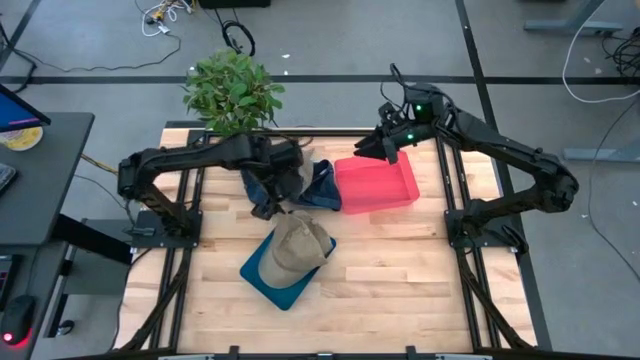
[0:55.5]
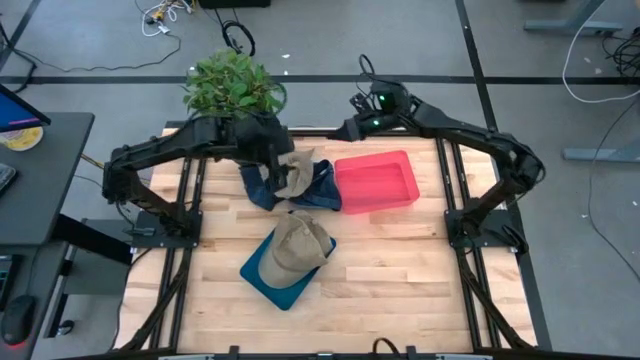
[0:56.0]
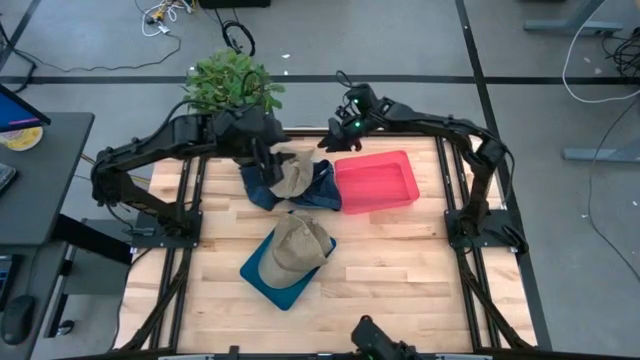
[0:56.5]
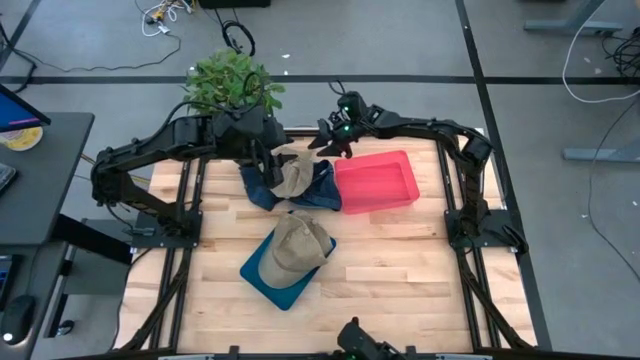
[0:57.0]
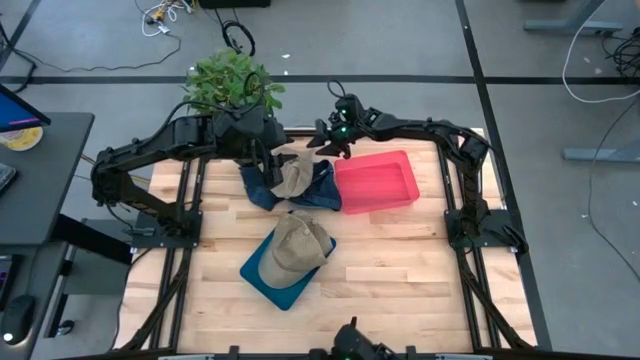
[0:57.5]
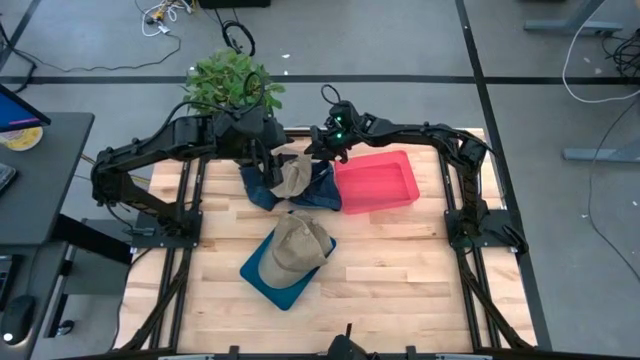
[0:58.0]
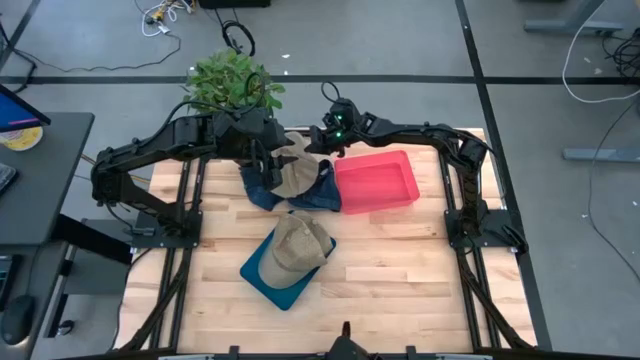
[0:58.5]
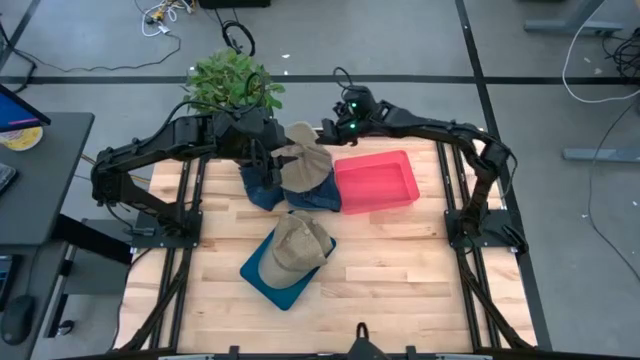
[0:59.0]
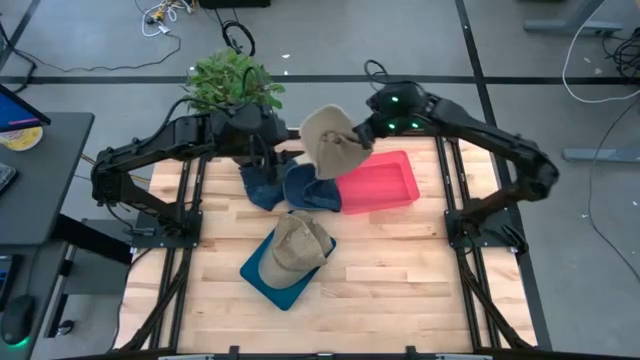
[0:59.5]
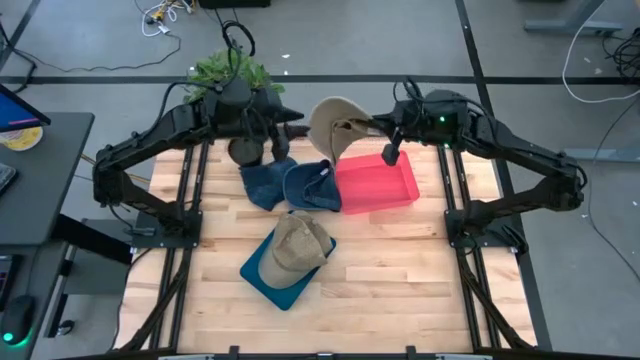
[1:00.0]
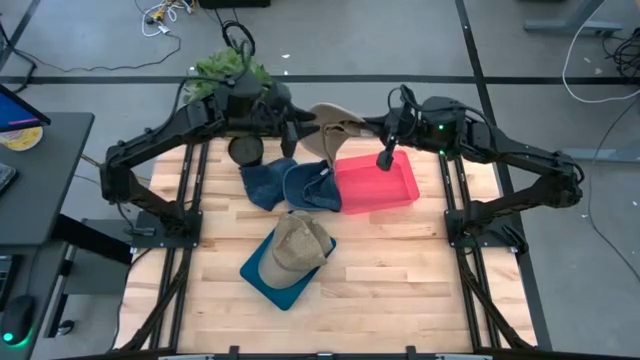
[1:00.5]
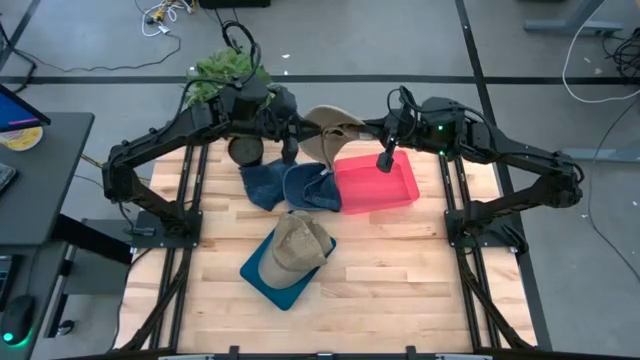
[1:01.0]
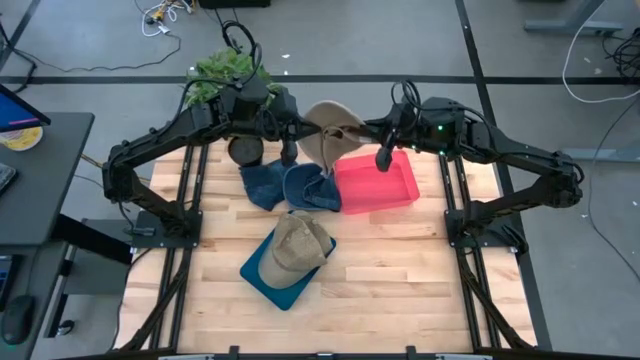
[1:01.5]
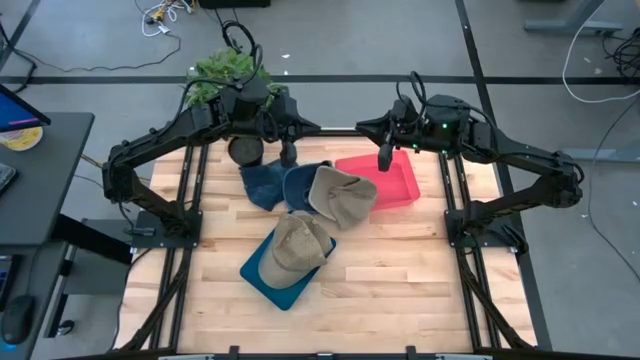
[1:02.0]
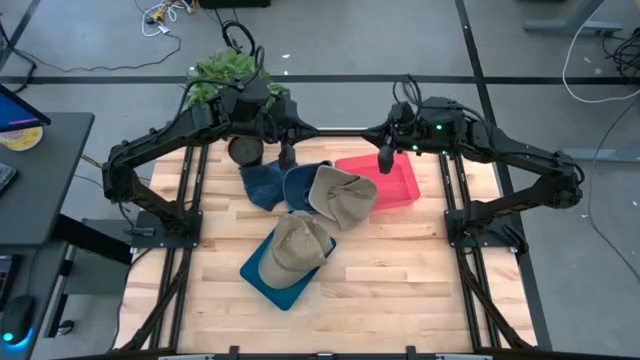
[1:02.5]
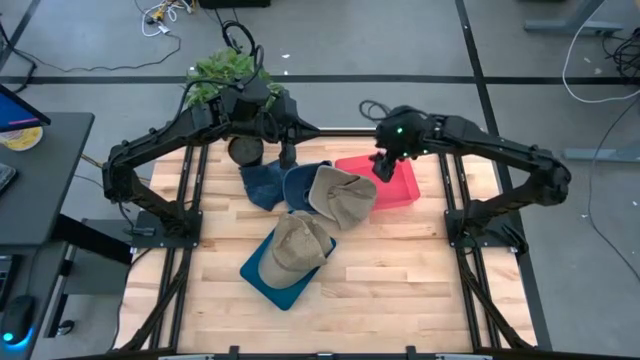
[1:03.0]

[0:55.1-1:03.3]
Task: Pick & Place hat
Put the brown cap into the blue bin

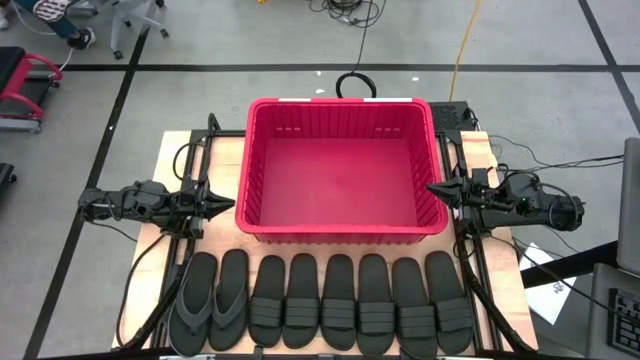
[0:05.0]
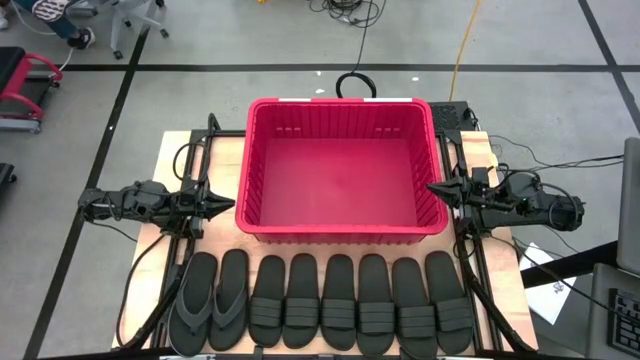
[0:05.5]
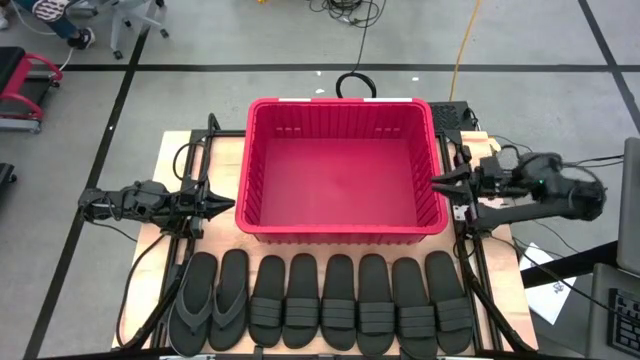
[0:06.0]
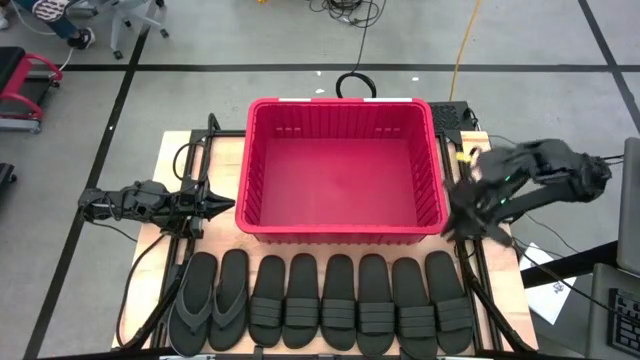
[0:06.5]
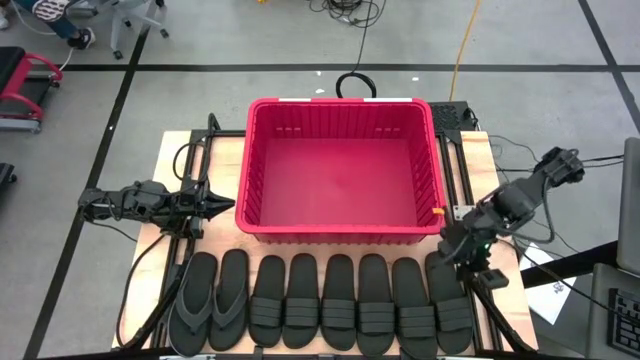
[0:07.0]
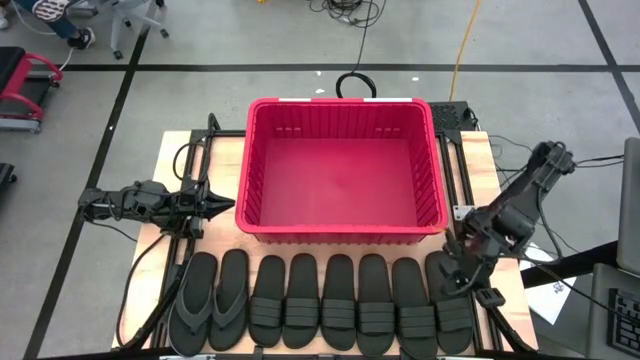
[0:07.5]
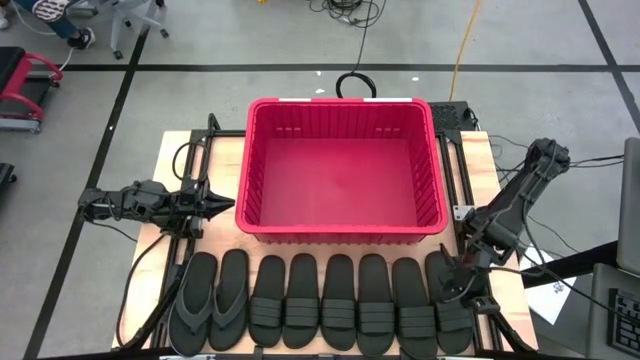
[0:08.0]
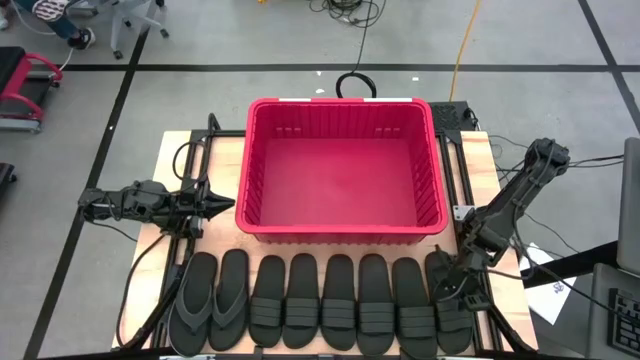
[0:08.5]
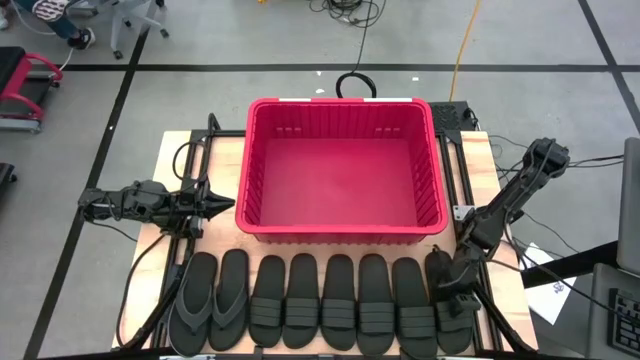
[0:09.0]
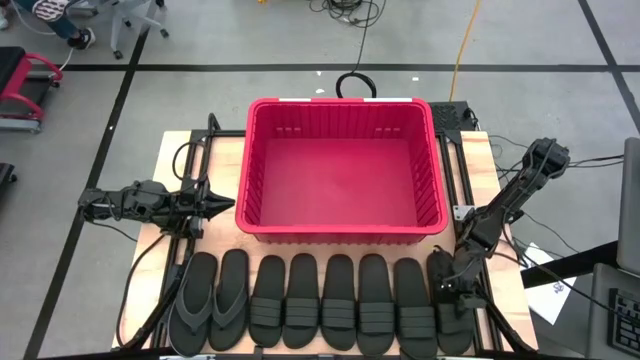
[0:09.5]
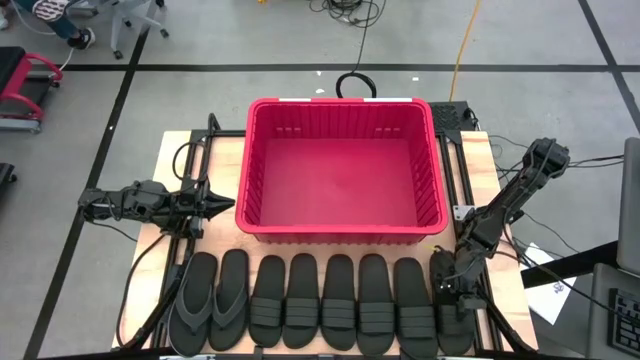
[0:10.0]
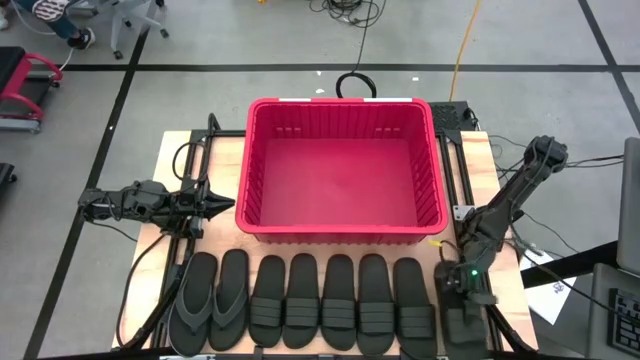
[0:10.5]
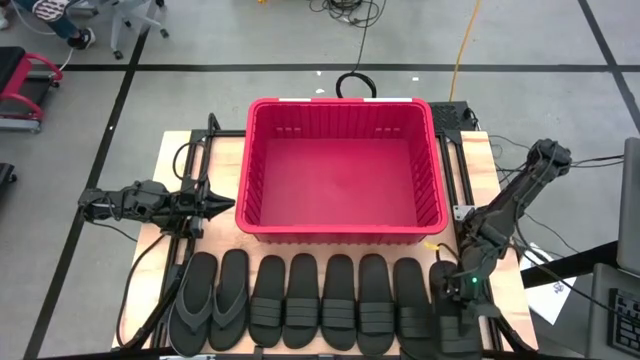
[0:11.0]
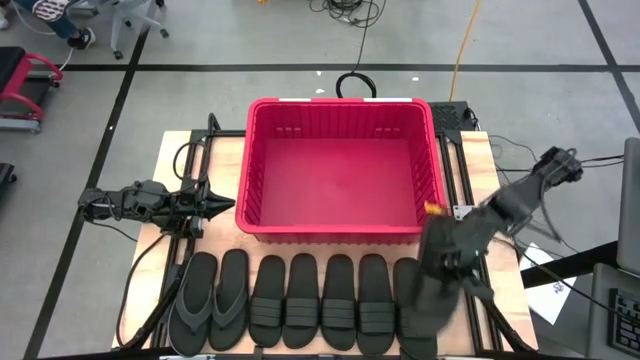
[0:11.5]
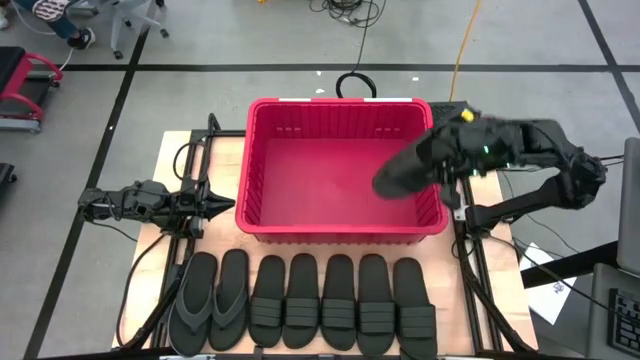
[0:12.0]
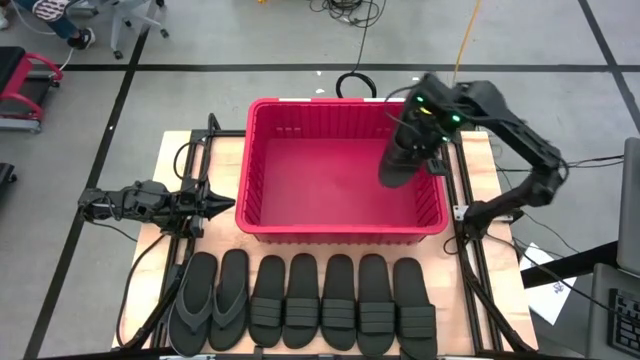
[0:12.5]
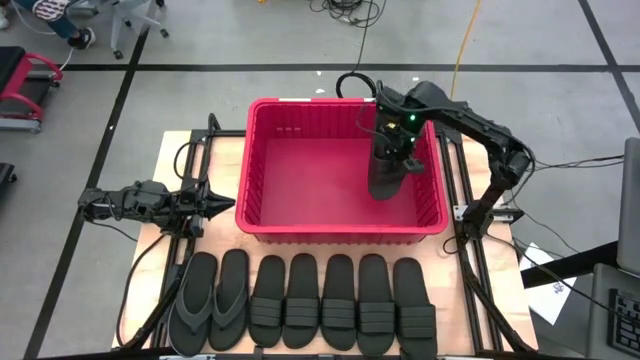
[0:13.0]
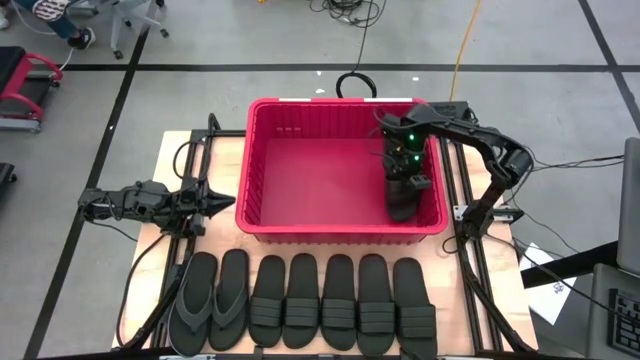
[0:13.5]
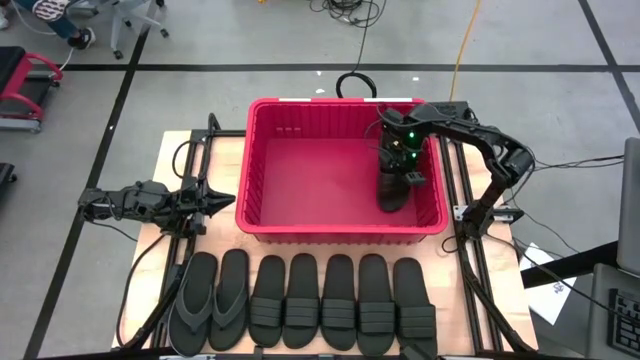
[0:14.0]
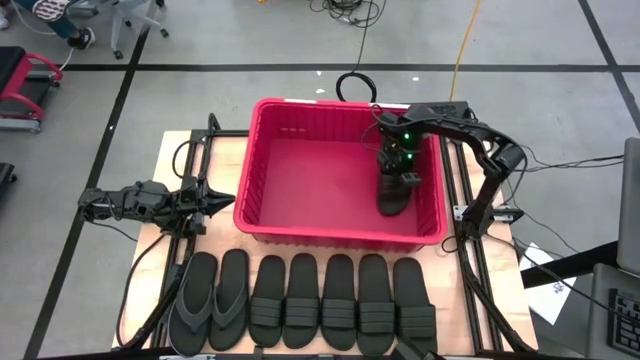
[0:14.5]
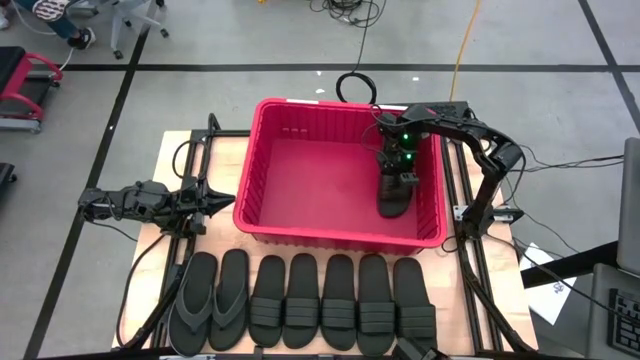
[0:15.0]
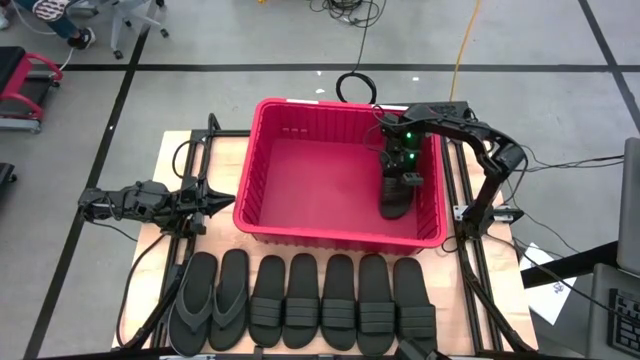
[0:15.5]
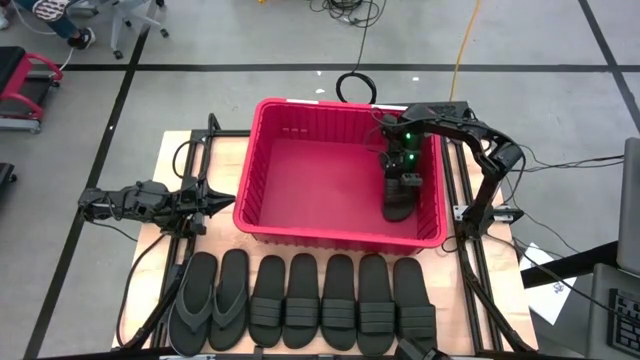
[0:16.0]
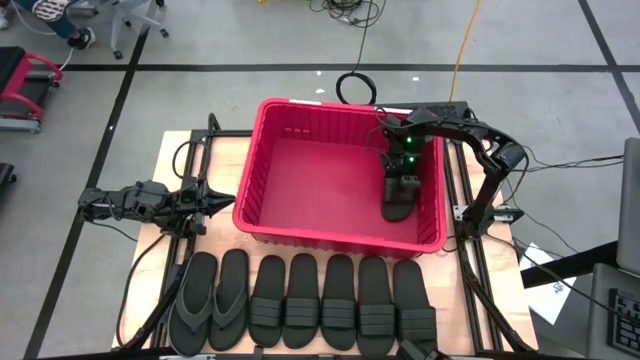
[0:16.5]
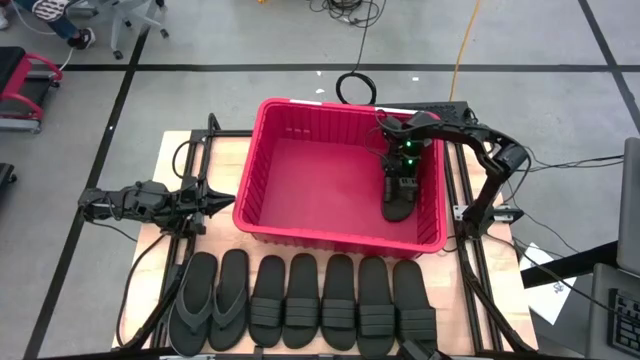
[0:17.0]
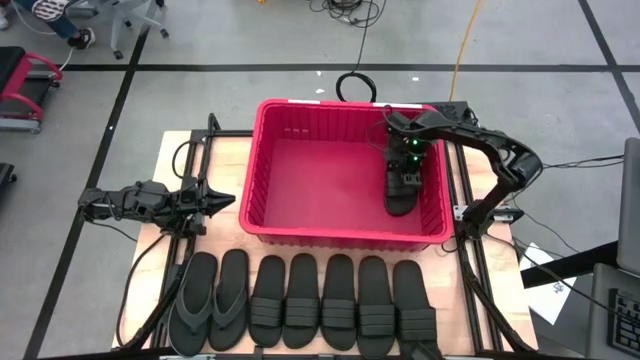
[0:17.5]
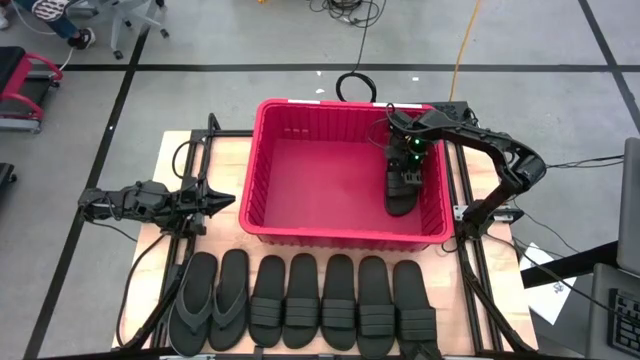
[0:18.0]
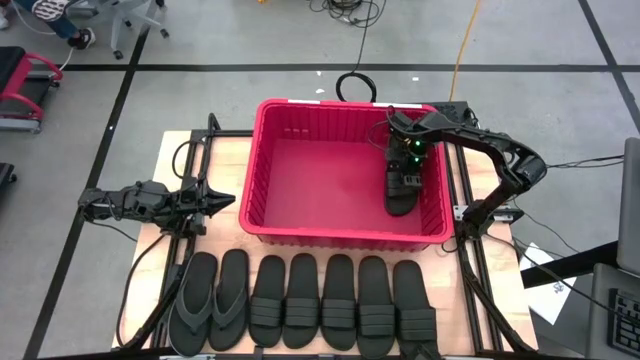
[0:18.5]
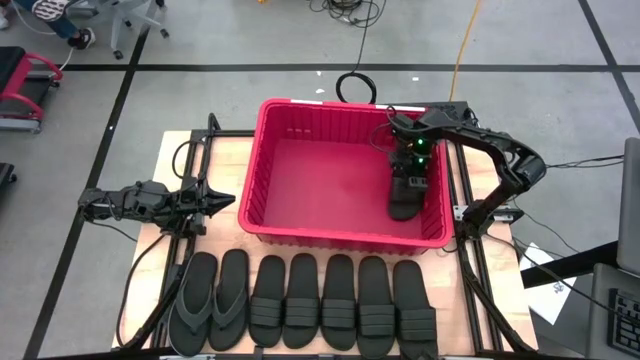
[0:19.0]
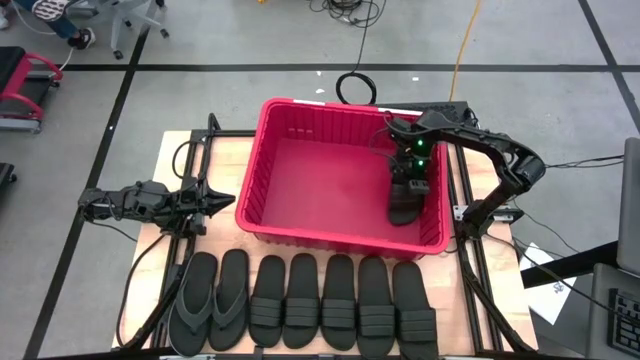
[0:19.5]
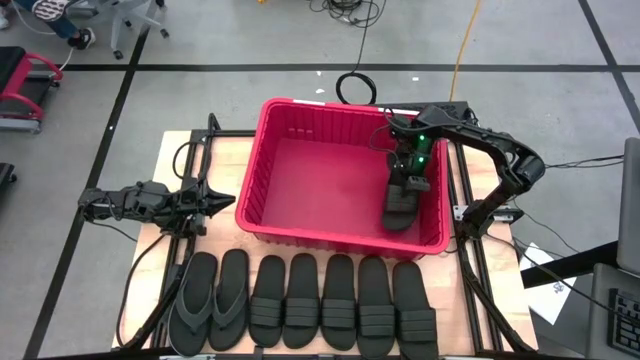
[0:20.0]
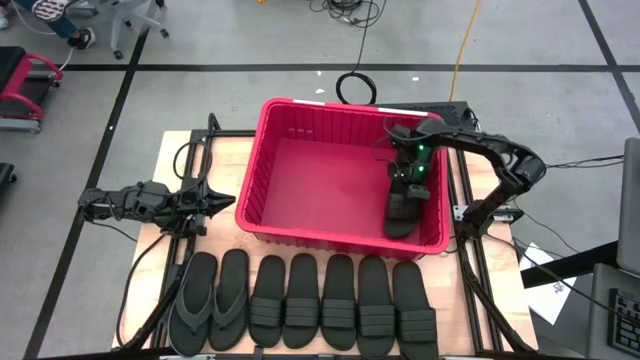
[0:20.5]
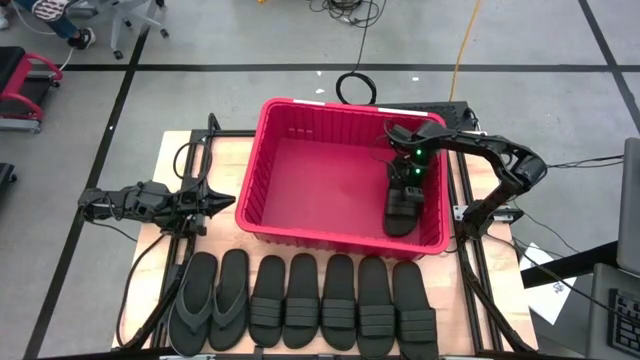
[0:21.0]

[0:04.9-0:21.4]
Task: Pick and place slides into bin
Put the black slide into the red bin
